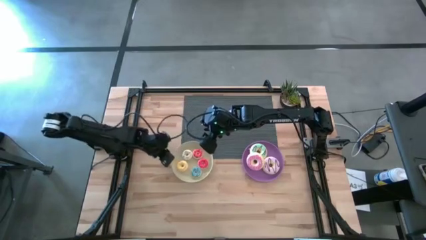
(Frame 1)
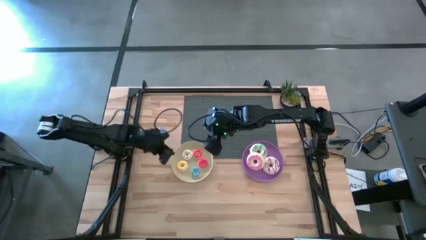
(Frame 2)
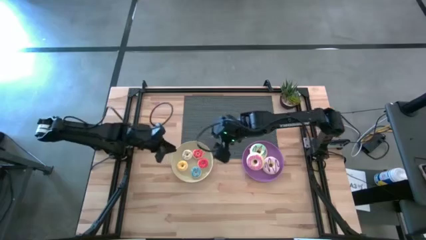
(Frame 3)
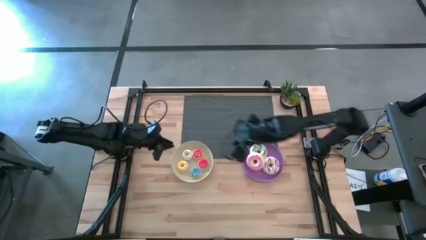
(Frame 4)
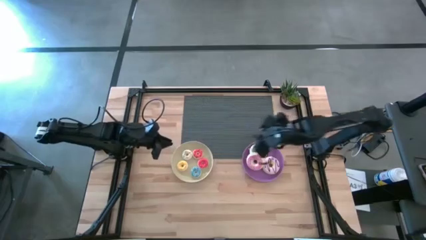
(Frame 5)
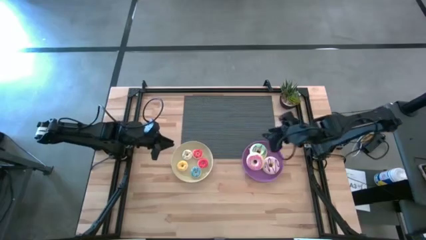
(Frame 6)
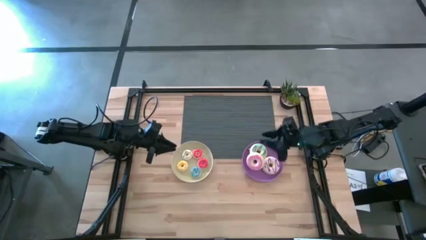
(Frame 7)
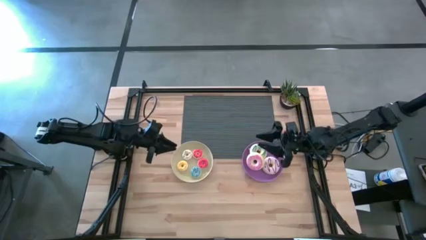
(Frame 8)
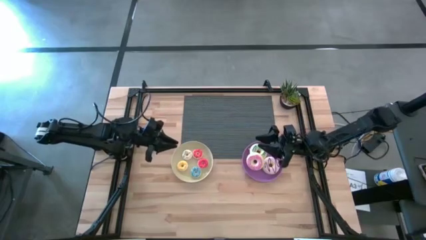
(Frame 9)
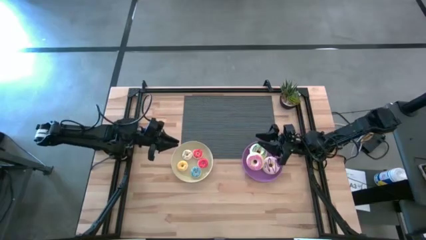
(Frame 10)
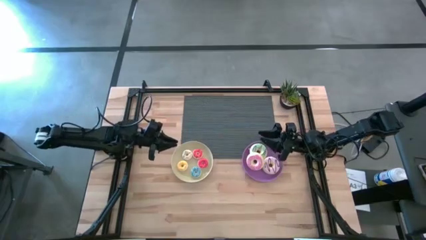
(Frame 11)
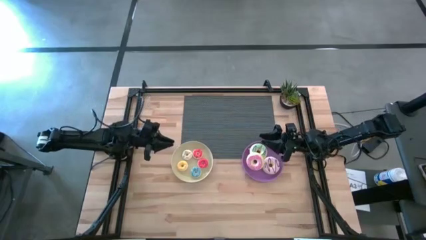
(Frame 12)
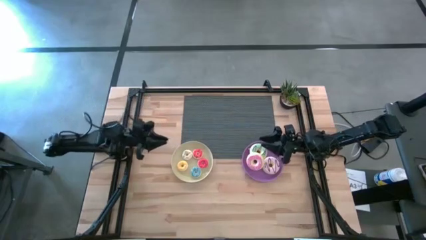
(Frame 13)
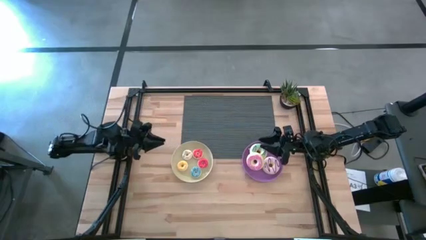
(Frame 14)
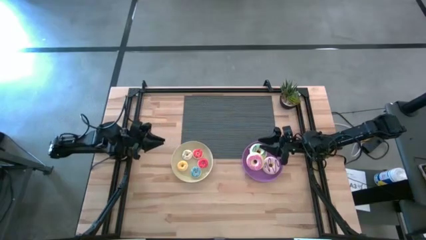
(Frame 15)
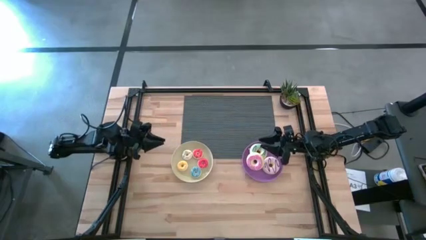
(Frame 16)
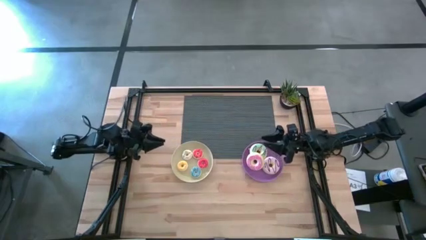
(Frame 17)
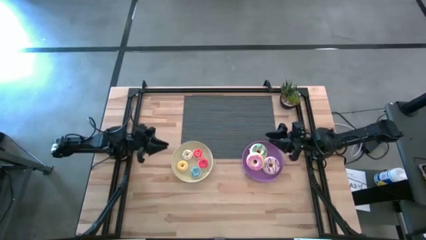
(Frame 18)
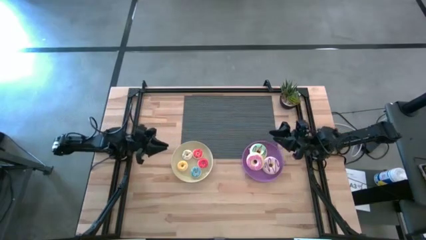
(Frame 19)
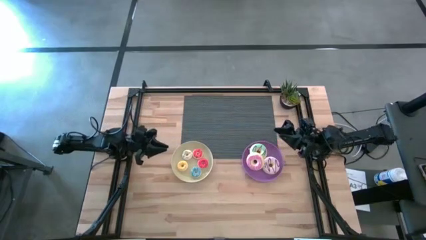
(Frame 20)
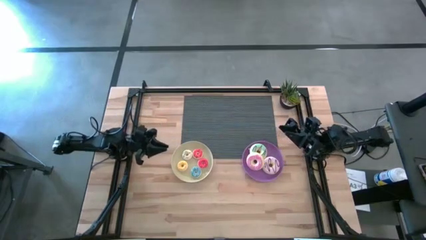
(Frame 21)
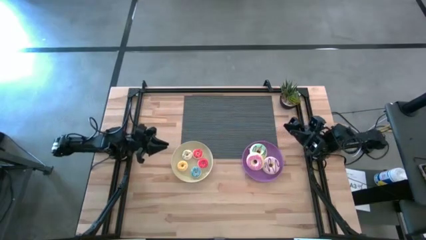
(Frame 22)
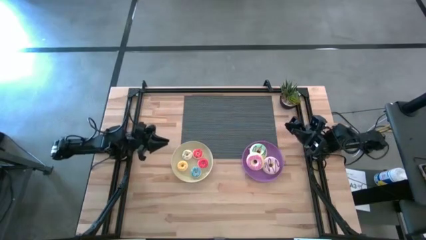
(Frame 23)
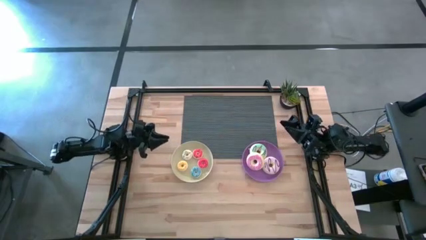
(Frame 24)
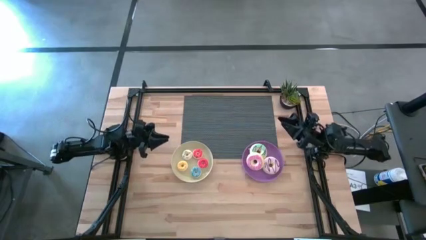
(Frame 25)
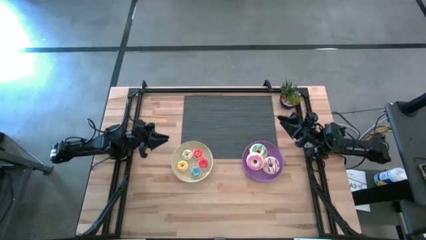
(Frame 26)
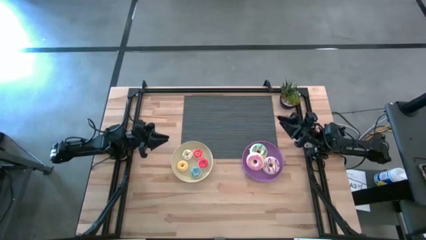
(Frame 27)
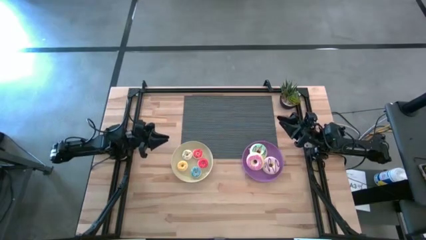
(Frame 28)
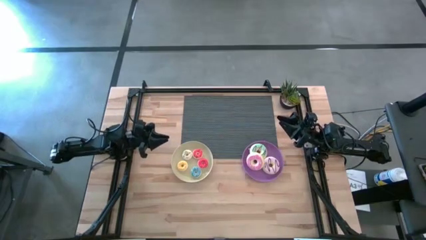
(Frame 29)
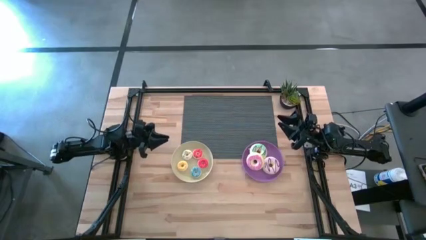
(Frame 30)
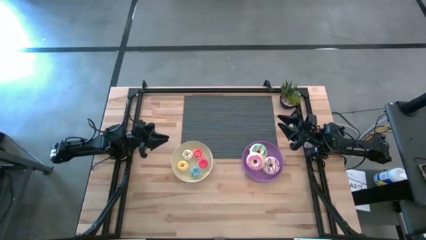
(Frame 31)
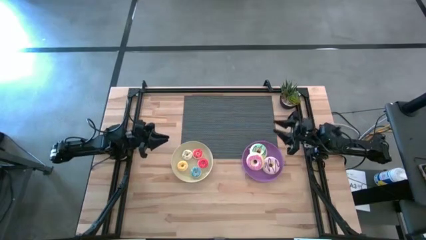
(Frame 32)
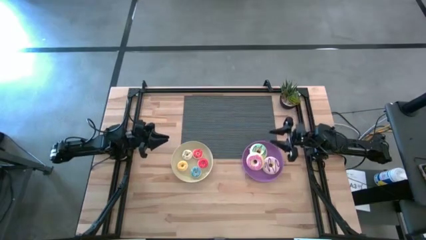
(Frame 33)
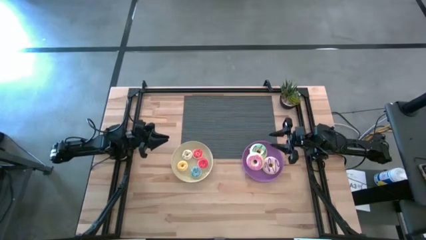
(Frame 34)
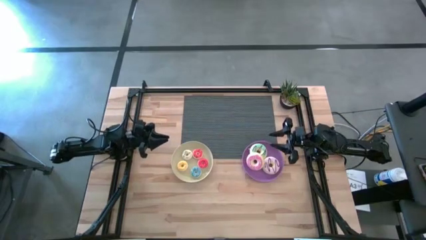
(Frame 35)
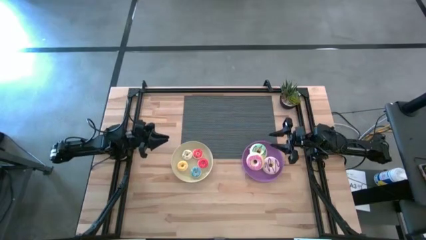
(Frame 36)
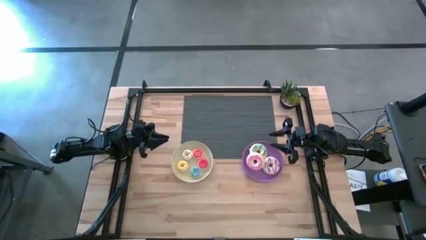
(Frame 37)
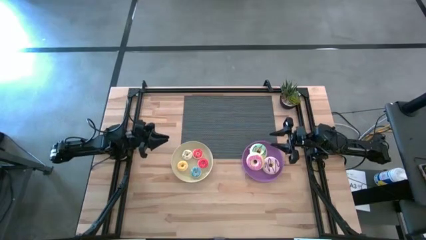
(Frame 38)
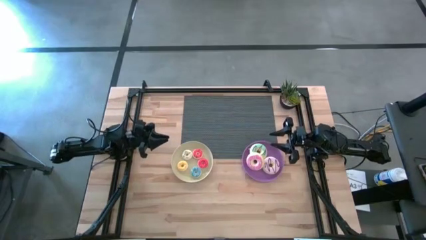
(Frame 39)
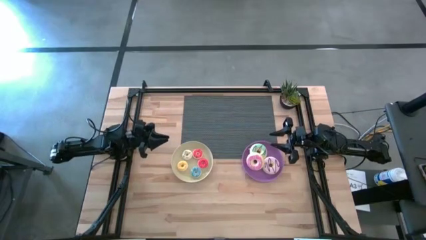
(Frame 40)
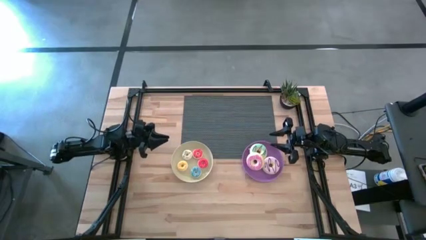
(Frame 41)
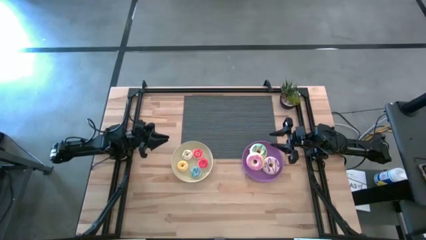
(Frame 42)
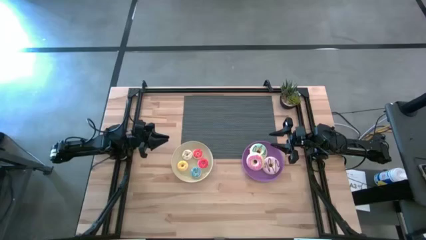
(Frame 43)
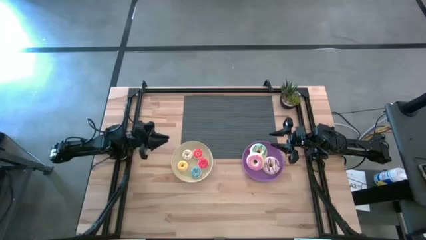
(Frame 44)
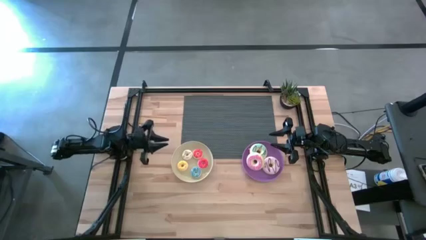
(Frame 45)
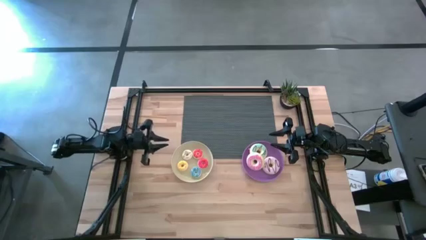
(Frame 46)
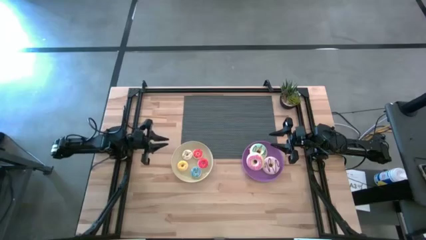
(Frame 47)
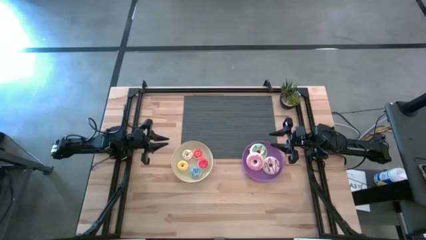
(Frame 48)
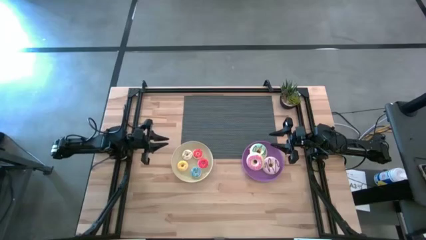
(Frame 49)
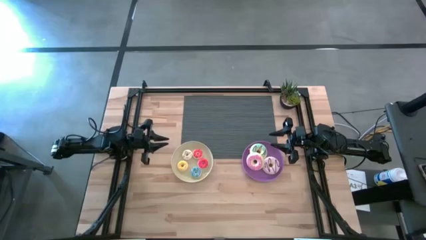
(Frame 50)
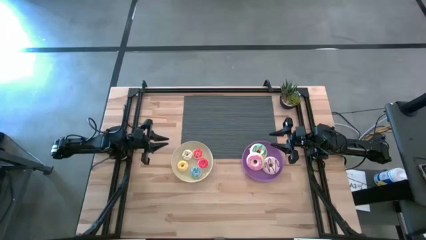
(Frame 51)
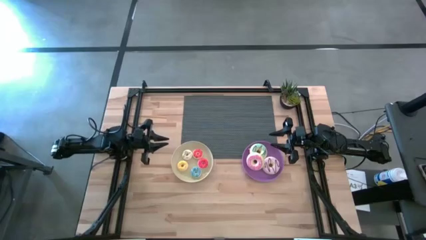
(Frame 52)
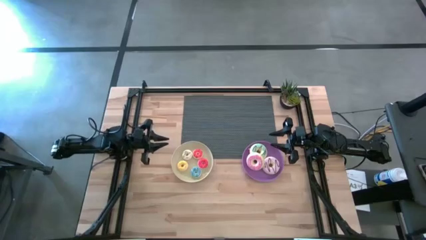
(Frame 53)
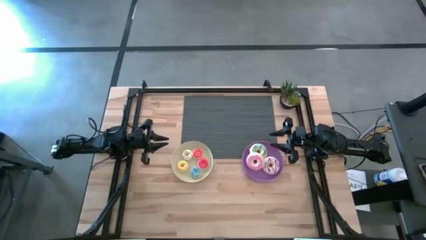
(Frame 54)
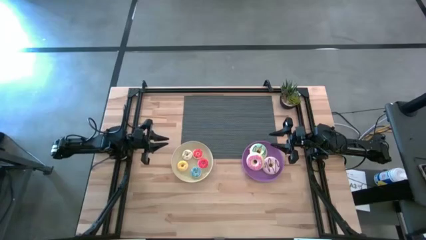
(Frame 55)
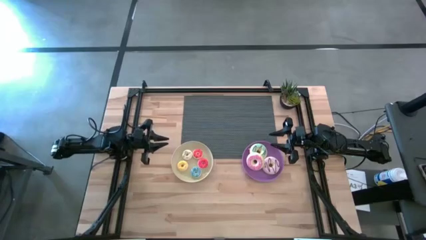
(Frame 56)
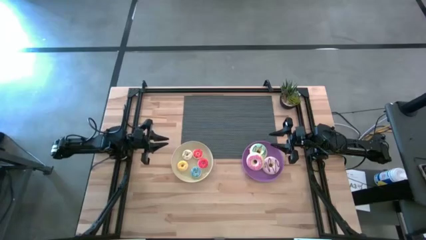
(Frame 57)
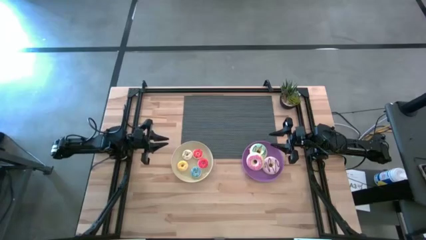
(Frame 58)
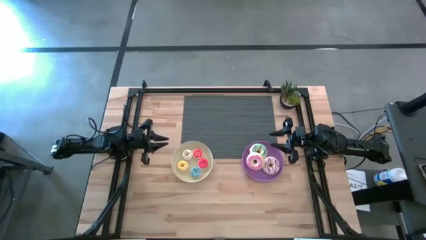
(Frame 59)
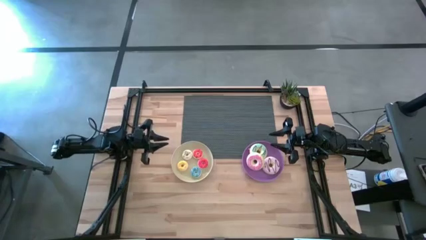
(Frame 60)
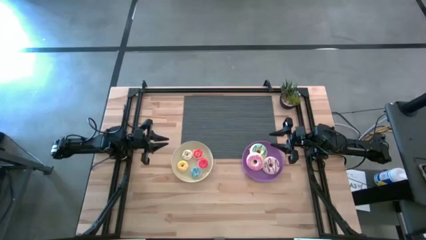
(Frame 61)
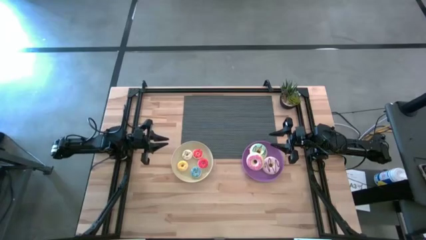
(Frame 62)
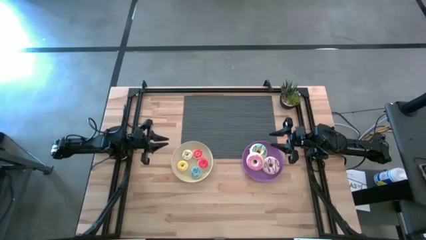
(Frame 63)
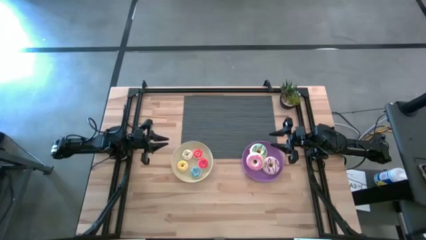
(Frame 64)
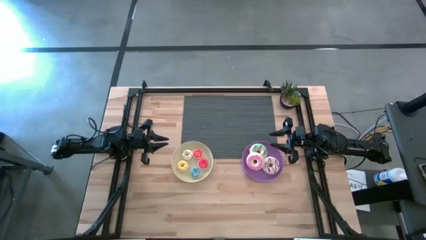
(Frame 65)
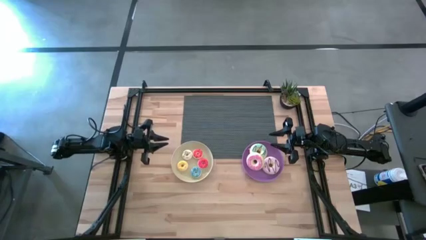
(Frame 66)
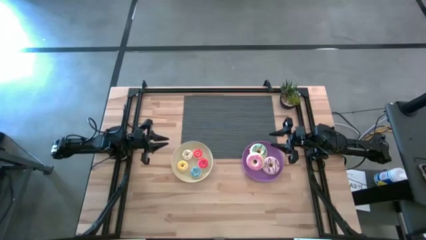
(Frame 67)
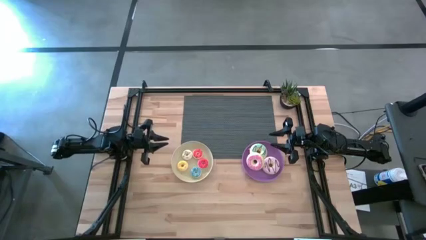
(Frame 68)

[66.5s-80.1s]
Task: Pick & Place donuts
Return to Home Position

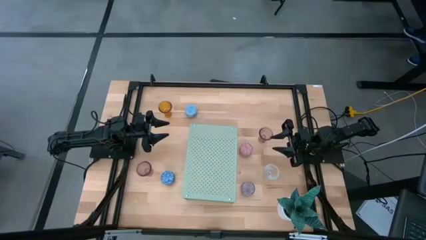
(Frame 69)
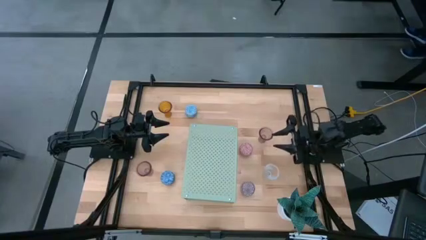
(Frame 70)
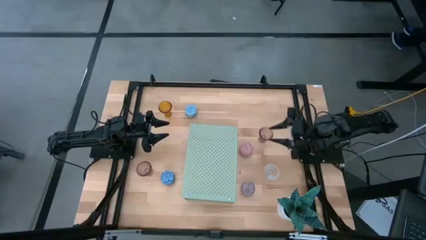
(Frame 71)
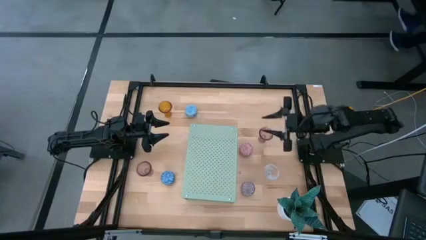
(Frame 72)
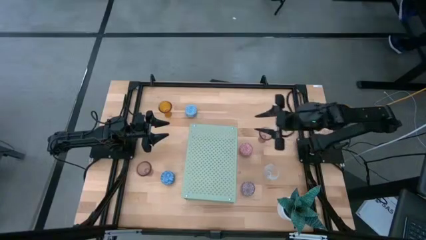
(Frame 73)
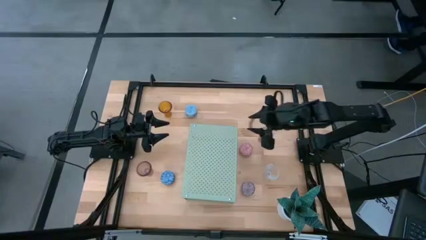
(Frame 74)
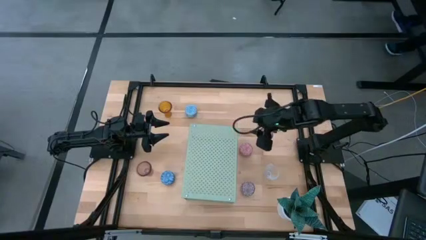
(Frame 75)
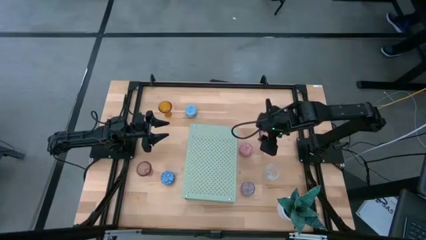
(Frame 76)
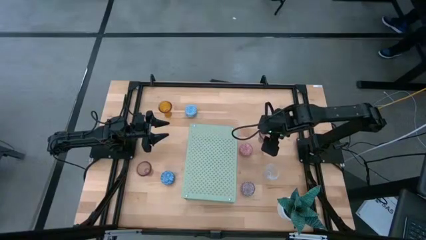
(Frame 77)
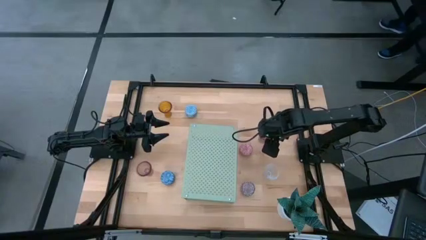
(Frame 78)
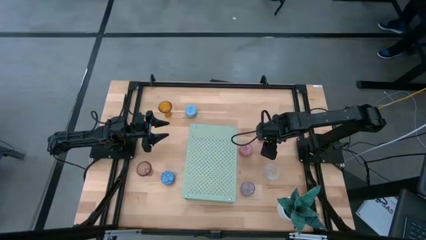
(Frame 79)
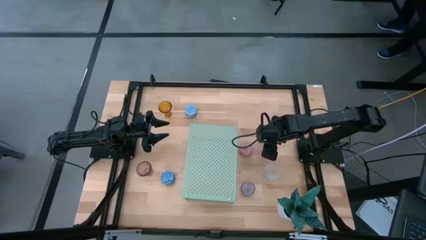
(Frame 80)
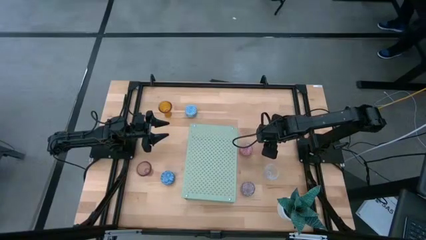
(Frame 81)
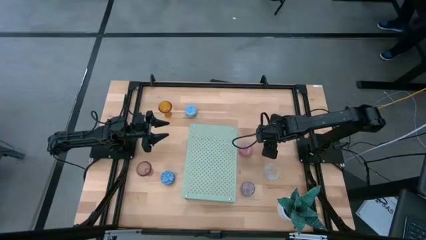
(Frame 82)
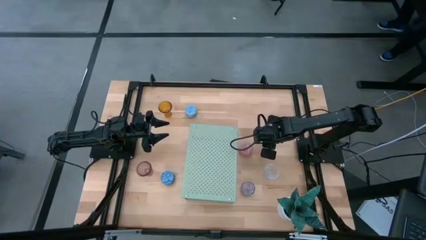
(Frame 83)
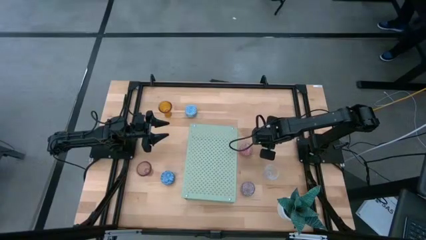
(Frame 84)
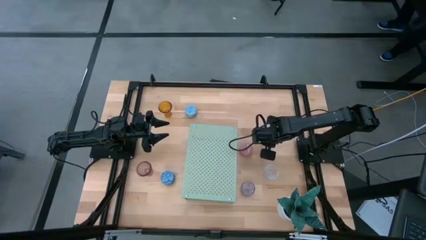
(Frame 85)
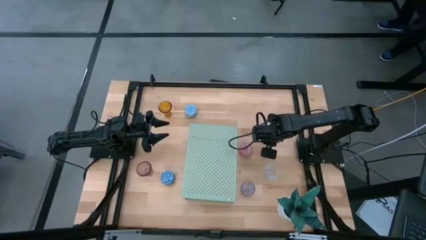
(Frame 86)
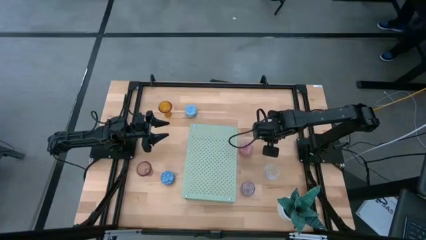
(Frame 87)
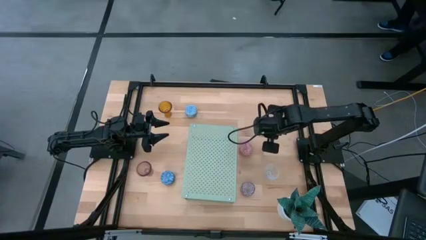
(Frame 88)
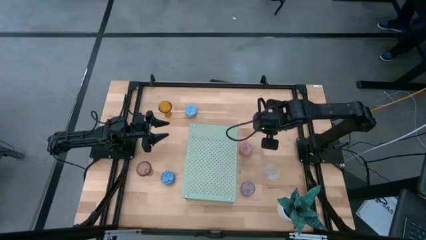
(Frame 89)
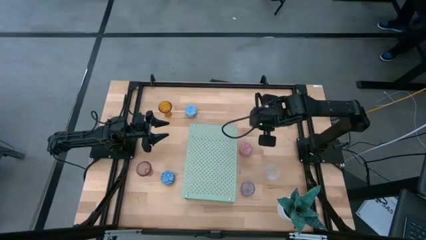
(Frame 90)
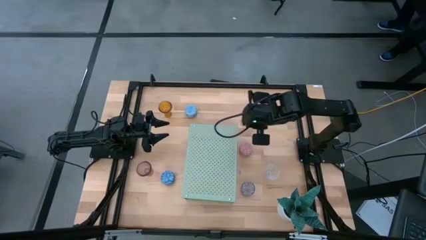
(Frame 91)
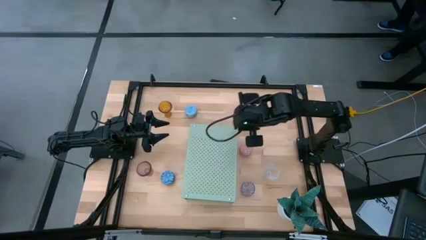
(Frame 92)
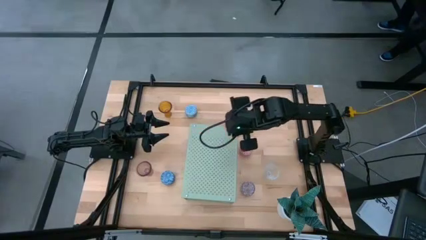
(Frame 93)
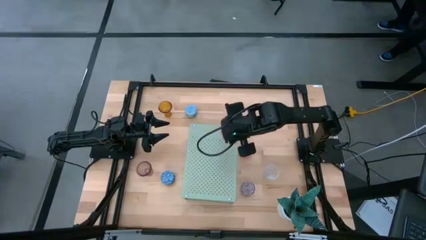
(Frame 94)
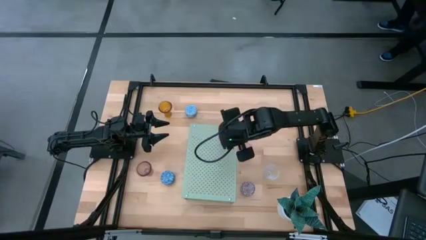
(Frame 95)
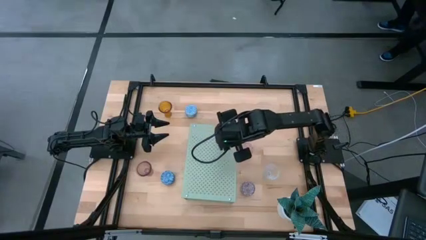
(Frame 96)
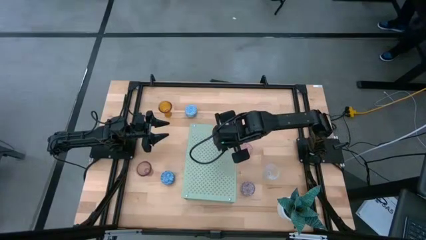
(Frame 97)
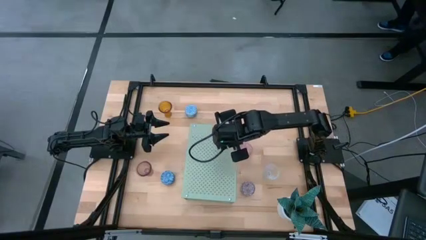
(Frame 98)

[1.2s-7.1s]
Task: Pick & Place candle stick holders
Put the top pink candle holder on the shelf
